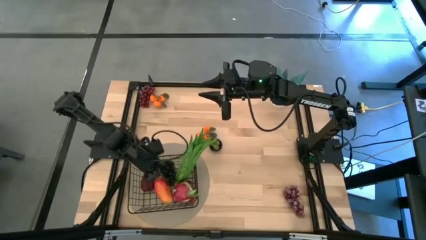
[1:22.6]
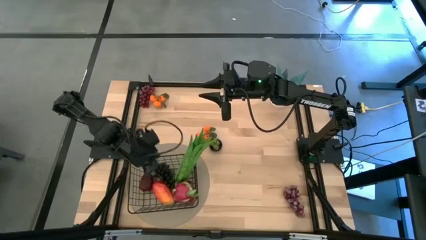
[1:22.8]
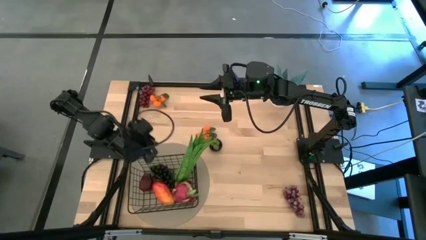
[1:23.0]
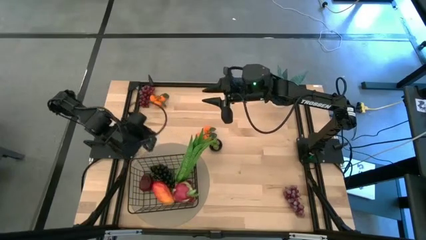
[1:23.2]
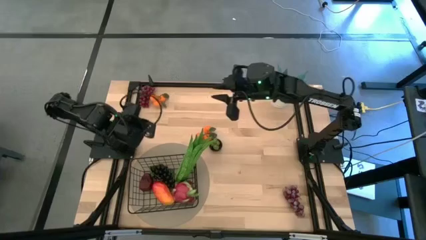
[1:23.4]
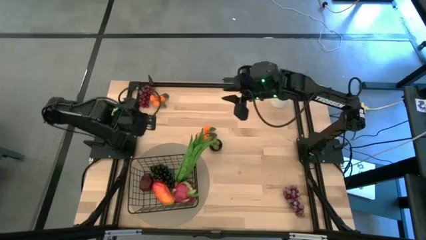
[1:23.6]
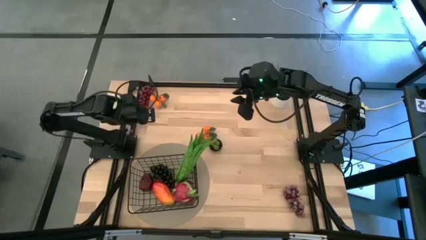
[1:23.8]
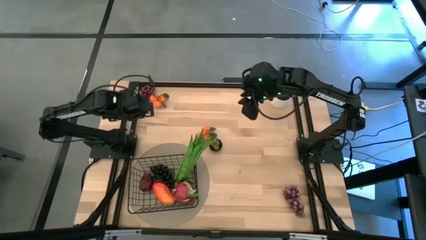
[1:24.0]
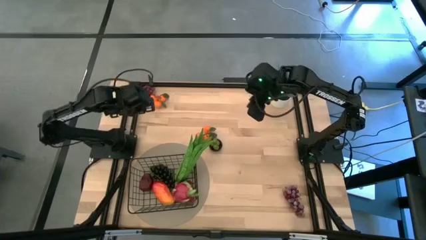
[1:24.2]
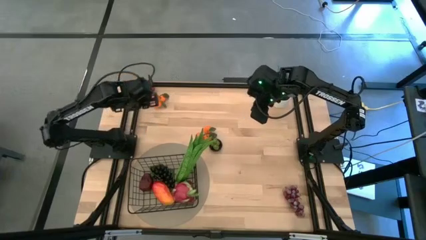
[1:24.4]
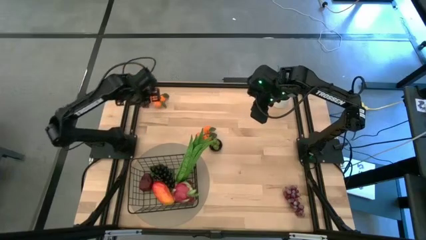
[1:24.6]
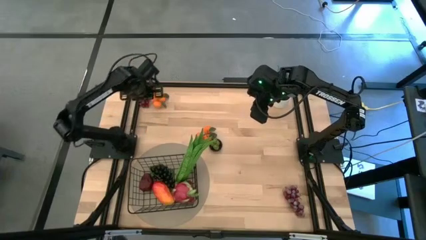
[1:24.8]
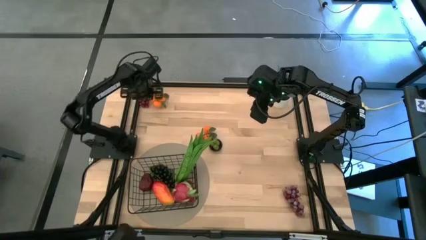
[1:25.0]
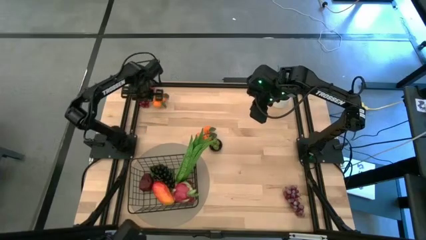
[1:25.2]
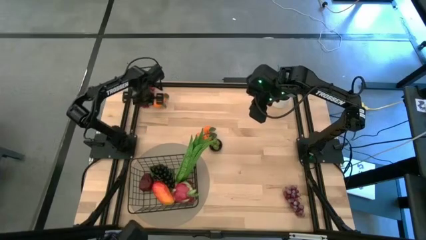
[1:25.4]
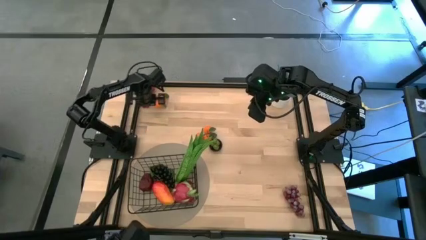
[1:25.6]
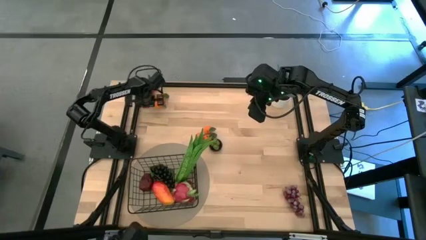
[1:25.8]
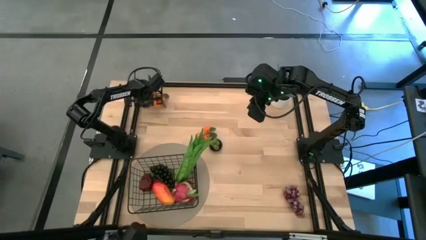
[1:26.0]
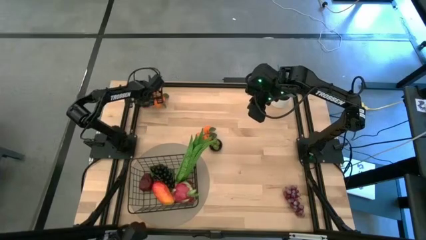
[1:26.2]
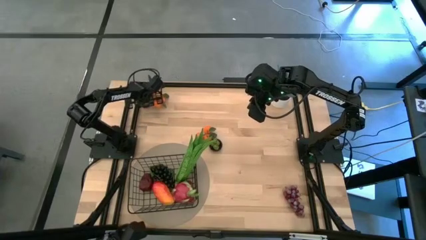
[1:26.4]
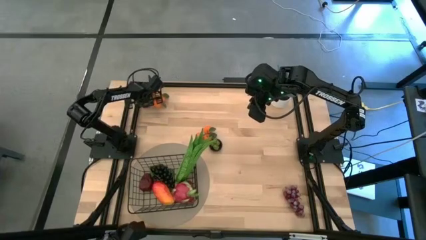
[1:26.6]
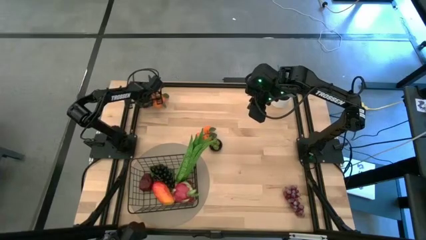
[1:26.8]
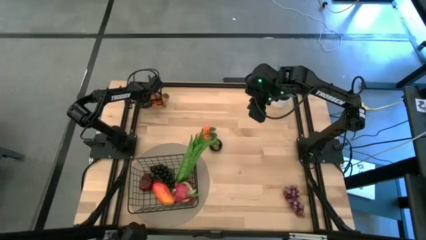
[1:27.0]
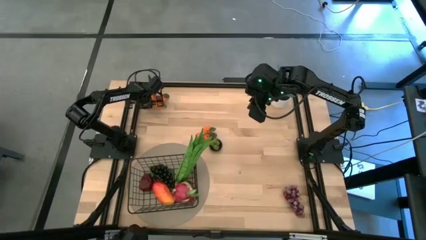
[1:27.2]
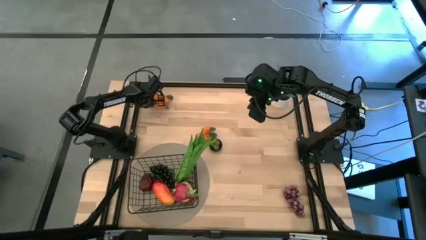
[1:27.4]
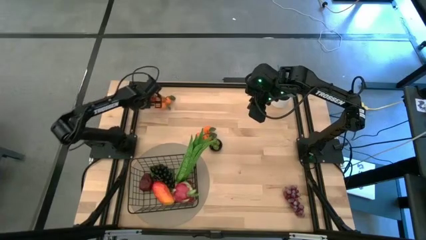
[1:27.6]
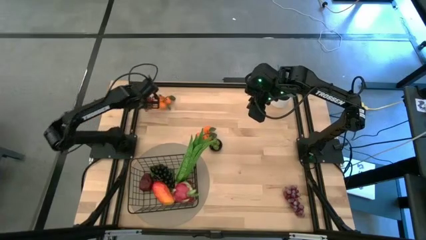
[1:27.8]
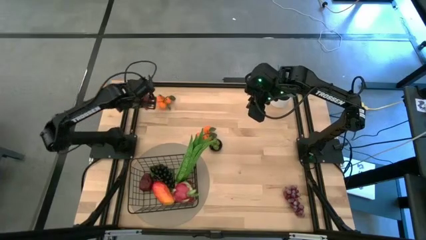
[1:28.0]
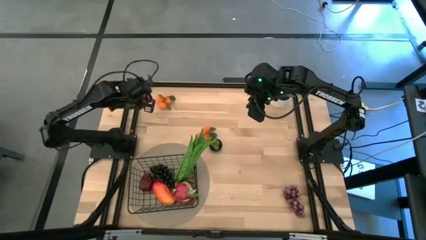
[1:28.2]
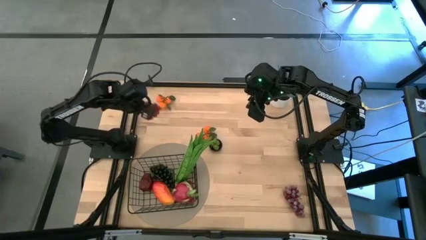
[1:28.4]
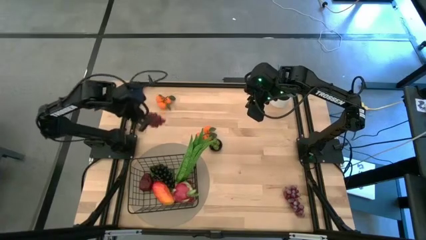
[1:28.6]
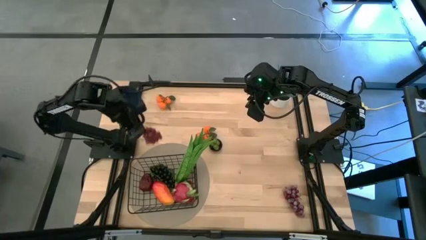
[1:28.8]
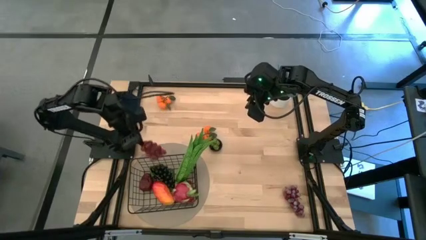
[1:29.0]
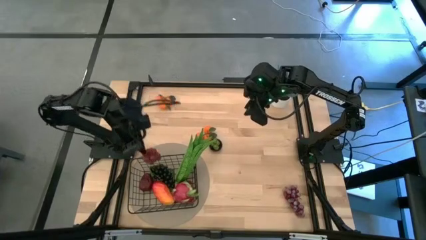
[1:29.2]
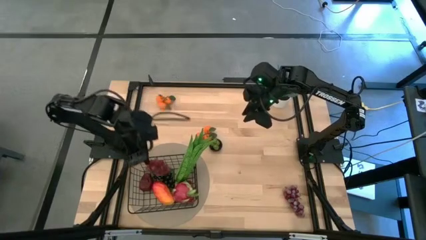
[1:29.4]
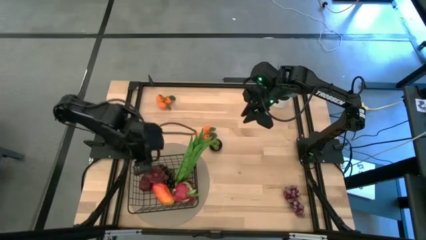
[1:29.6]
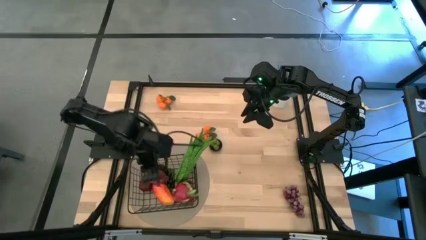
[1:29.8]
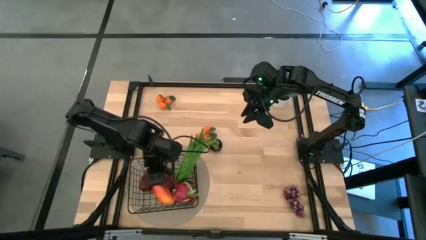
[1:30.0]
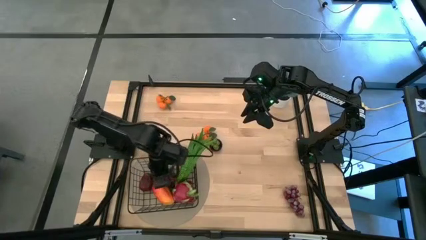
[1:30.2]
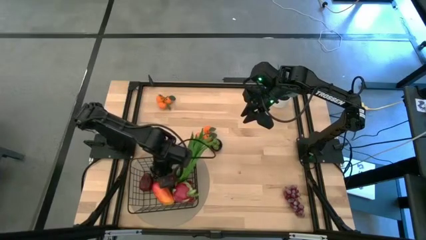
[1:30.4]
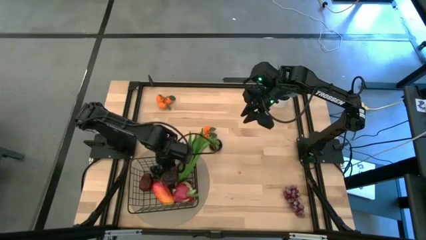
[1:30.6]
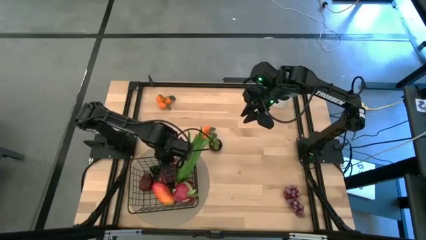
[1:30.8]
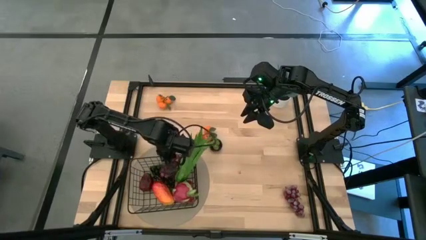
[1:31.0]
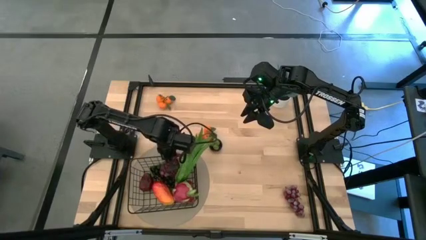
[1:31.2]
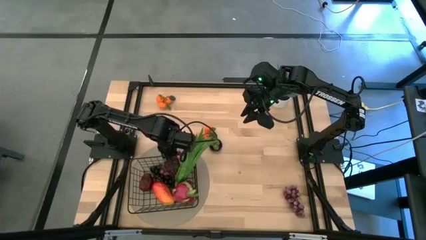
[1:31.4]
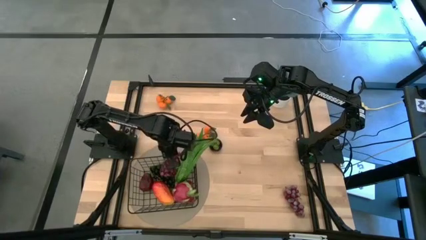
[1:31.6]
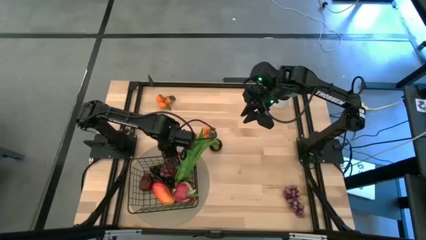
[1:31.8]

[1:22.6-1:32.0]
Task: Build produce basket
Put the purple grapes into the black wire basket

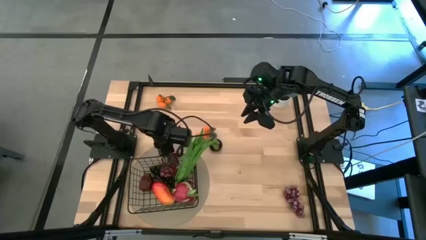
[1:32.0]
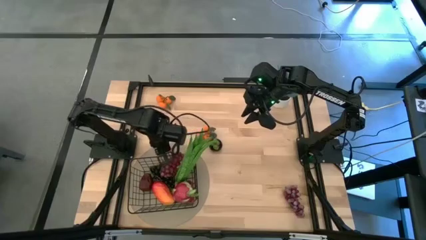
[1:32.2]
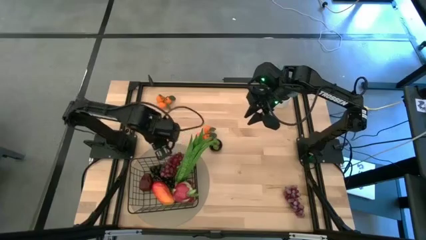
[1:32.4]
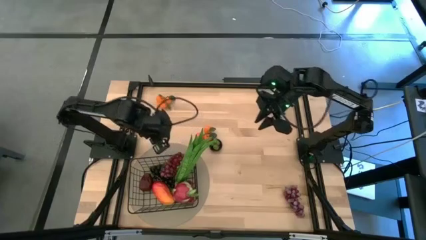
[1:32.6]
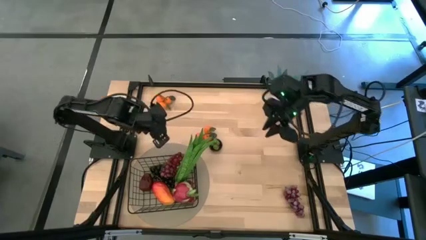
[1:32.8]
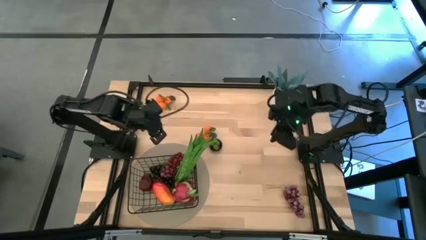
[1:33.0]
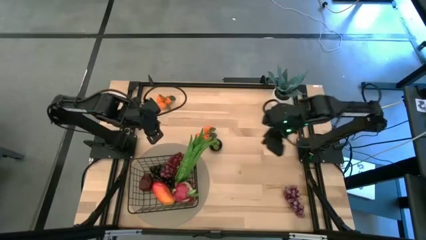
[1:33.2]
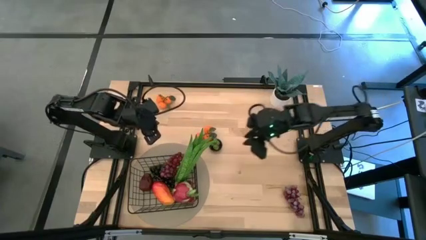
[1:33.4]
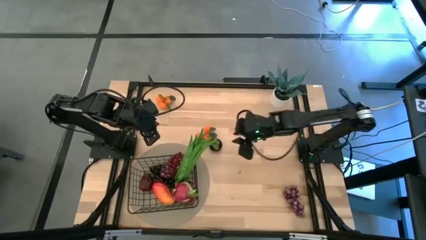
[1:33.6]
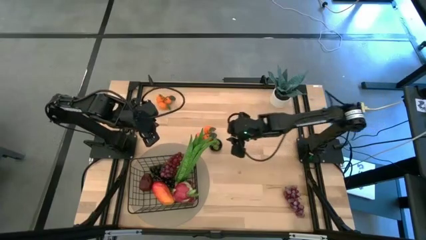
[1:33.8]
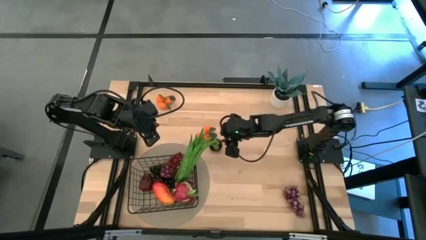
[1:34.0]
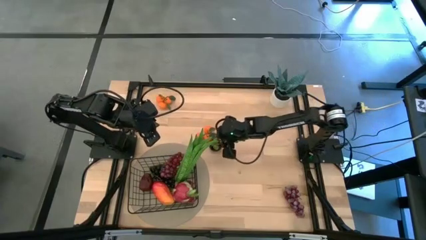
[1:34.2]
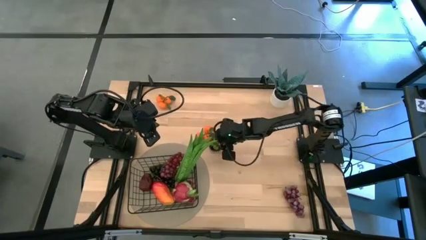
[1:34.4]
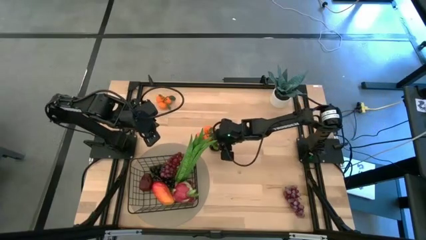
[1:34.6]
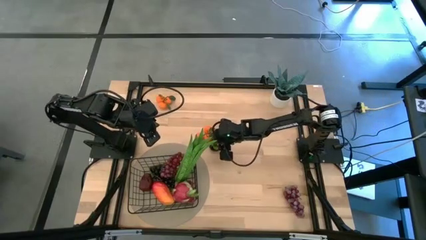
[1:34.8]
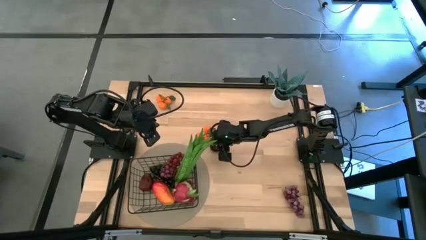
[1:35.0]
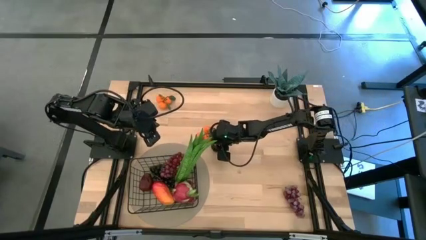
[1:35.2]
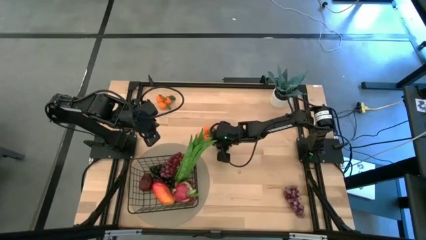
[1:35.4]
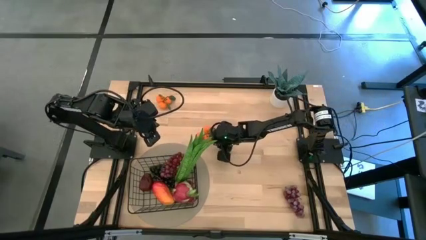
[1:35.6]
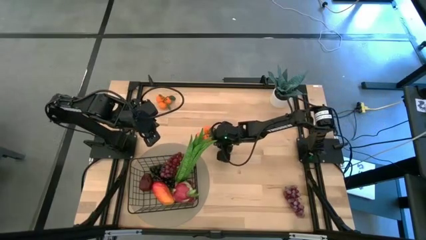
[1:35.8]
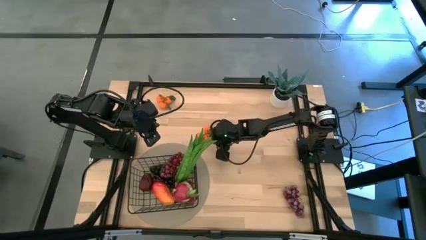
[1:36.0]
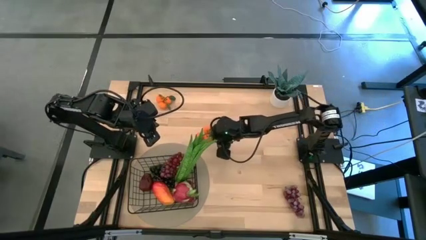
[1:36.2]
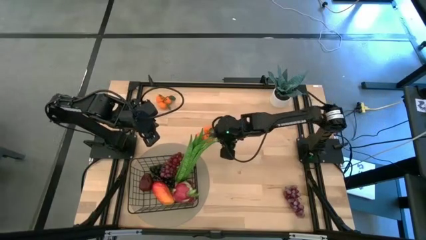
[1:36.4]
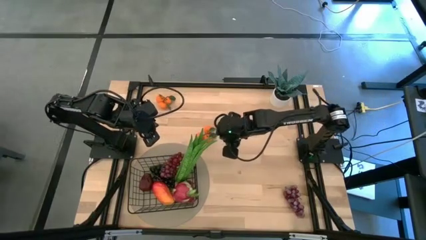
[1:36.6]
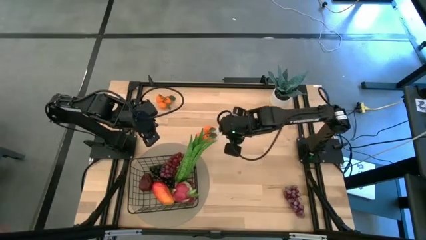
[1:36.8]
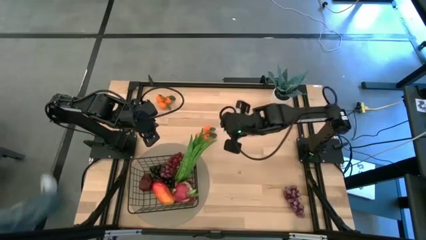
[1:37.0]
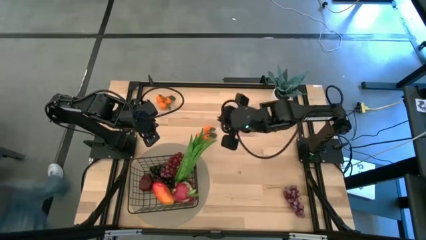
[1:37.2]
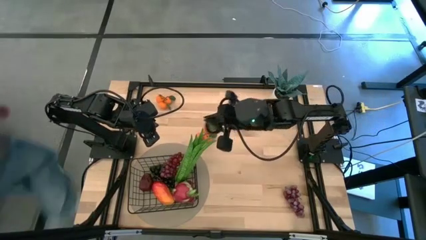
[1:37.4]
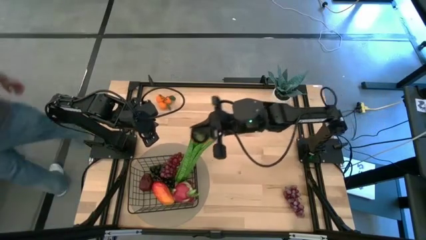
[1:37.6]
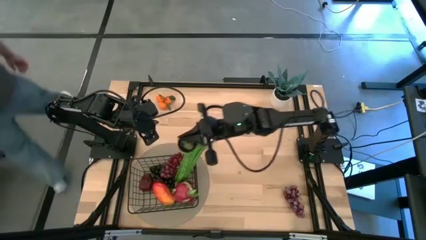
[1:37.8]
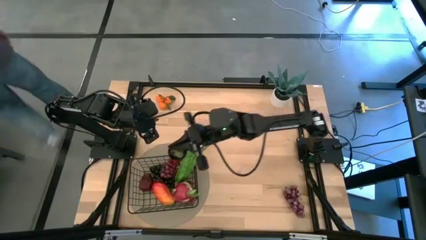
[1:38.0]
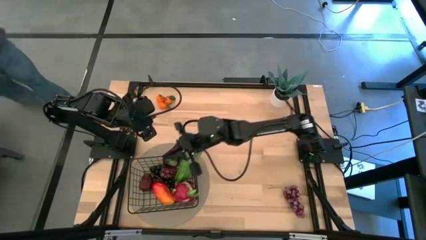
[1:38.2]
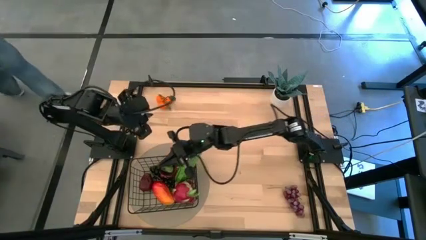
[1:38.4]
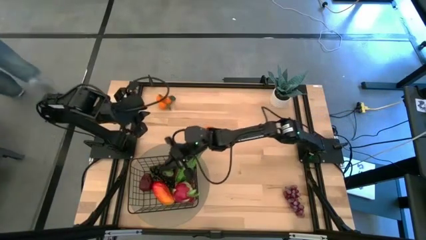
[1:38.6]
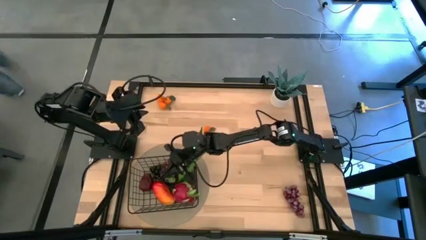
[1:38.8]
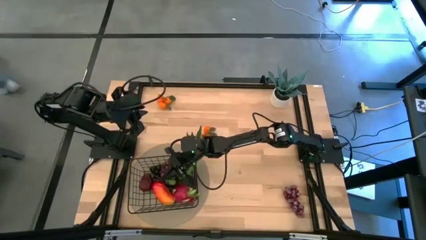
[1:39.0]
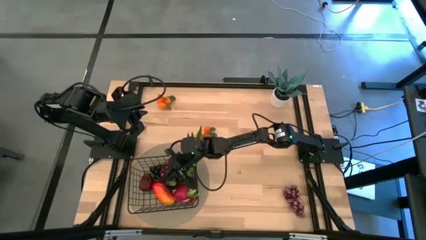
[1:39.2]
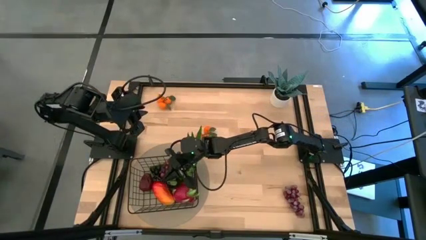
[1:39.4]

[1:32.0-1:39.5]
Put the black mangosteen into the black wire basket
